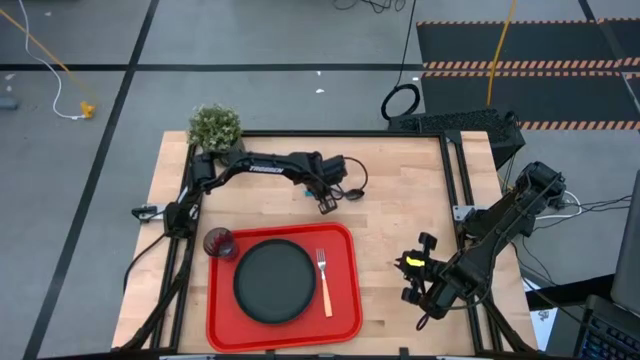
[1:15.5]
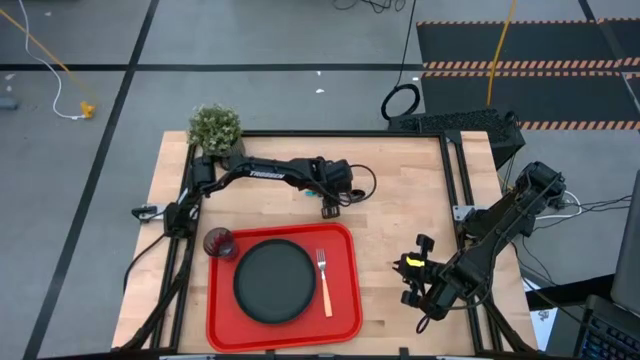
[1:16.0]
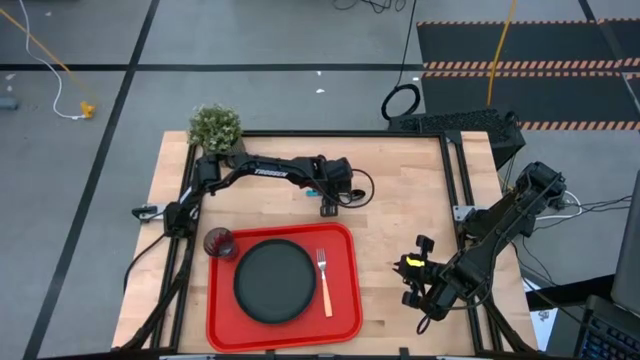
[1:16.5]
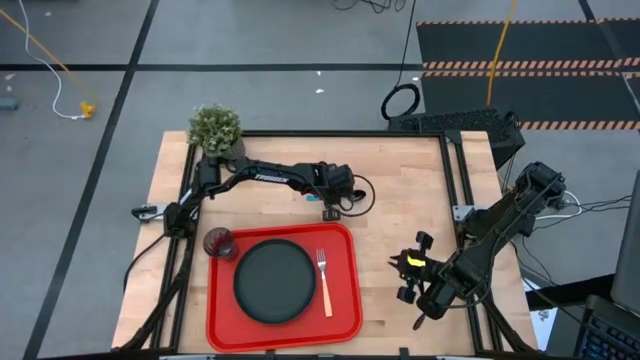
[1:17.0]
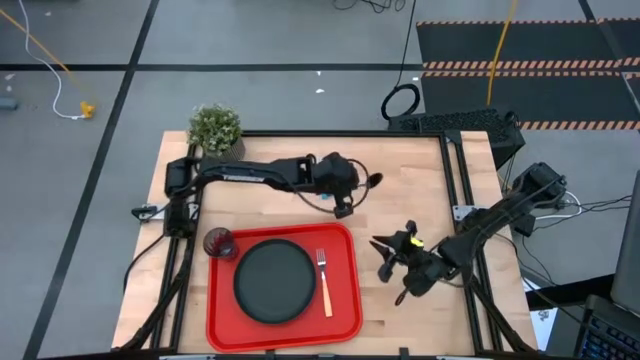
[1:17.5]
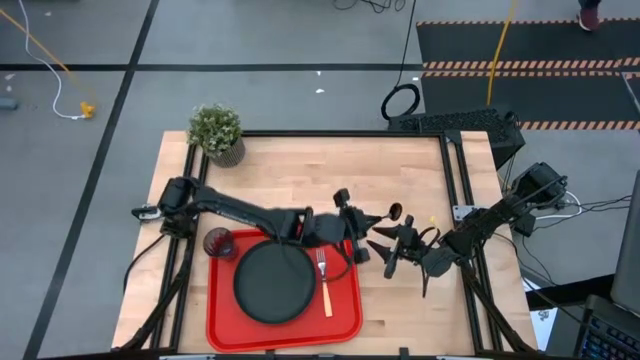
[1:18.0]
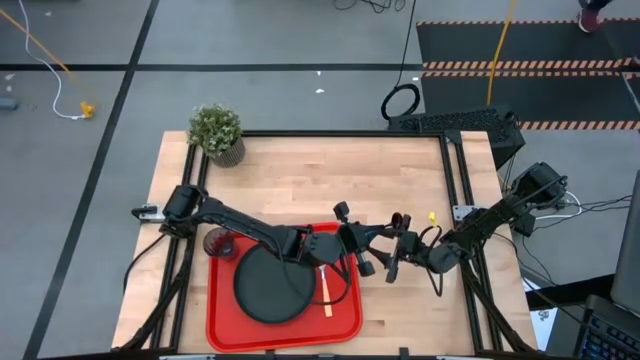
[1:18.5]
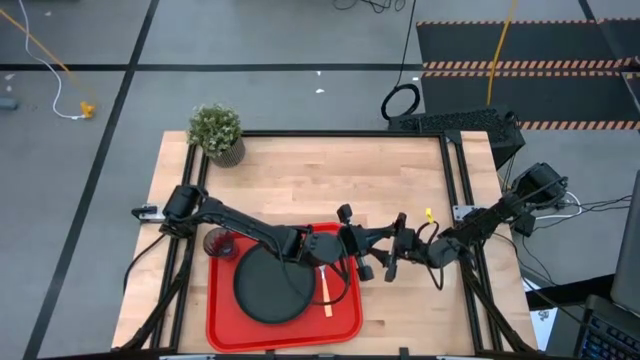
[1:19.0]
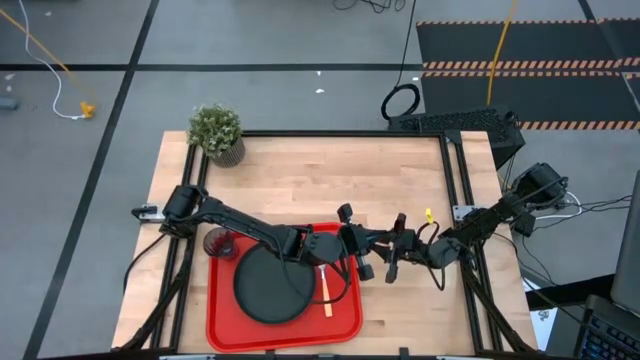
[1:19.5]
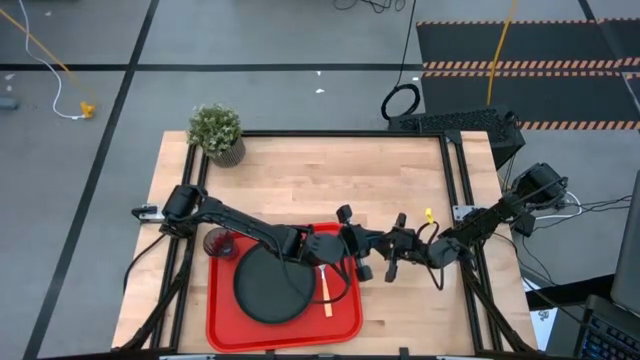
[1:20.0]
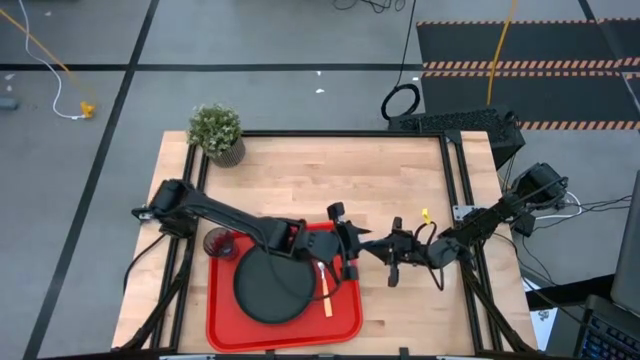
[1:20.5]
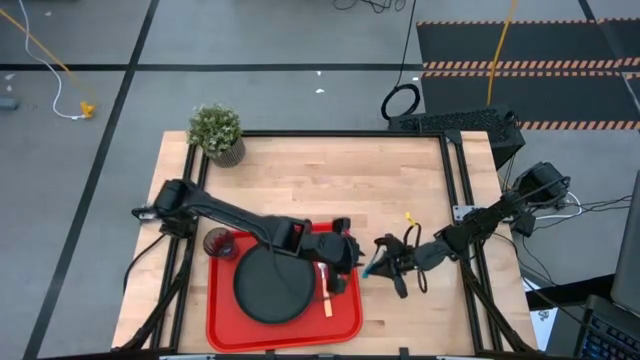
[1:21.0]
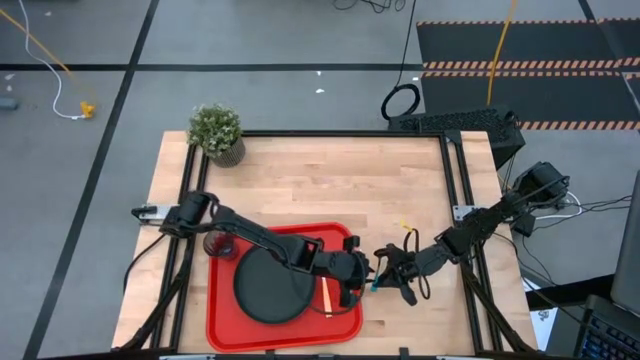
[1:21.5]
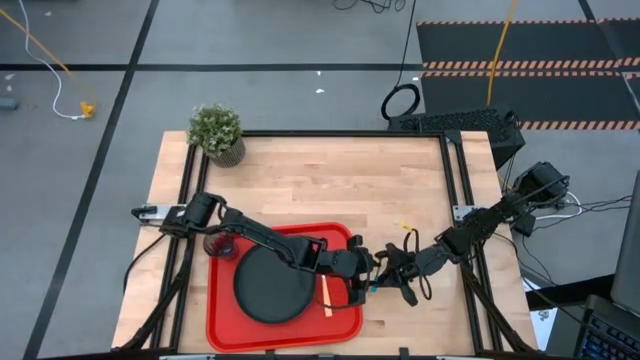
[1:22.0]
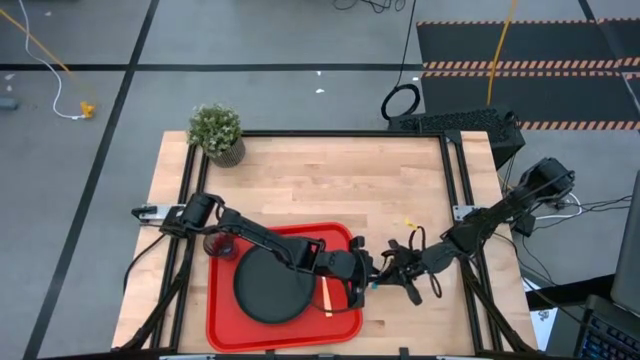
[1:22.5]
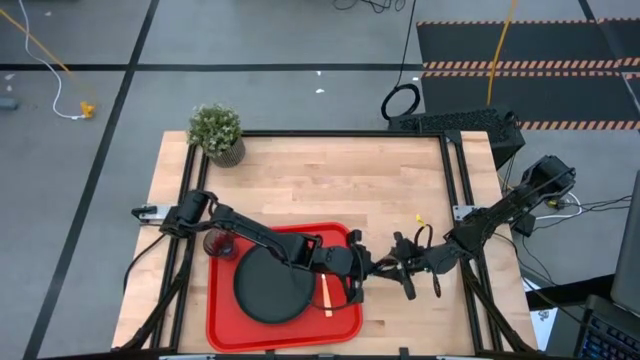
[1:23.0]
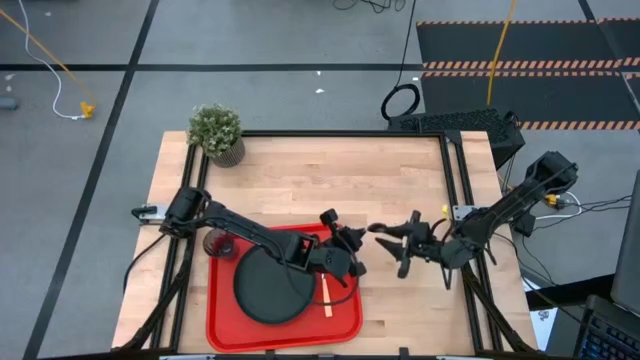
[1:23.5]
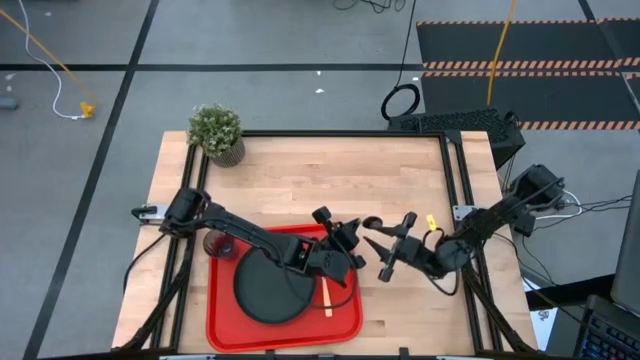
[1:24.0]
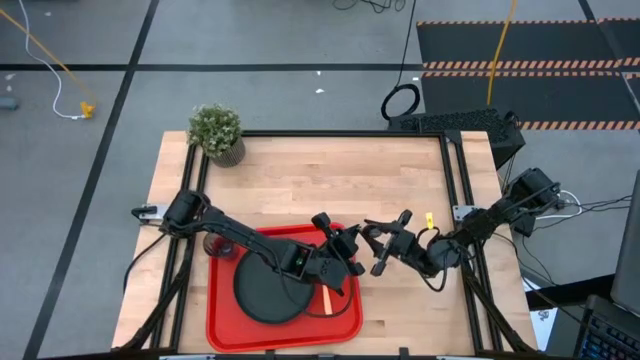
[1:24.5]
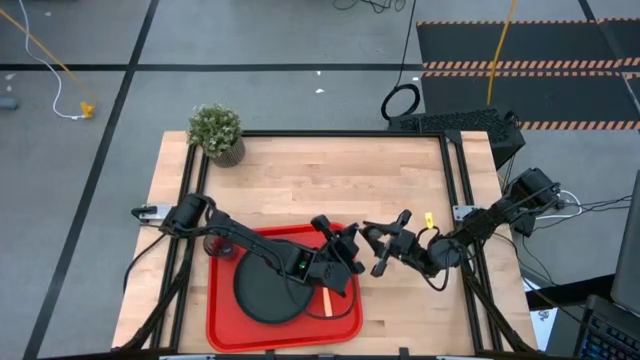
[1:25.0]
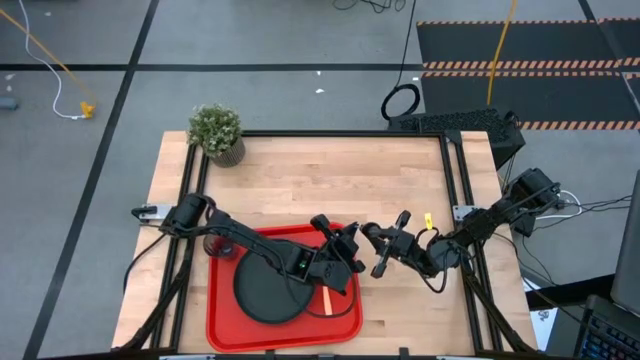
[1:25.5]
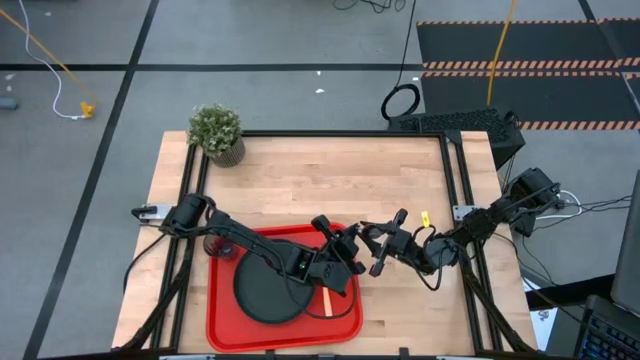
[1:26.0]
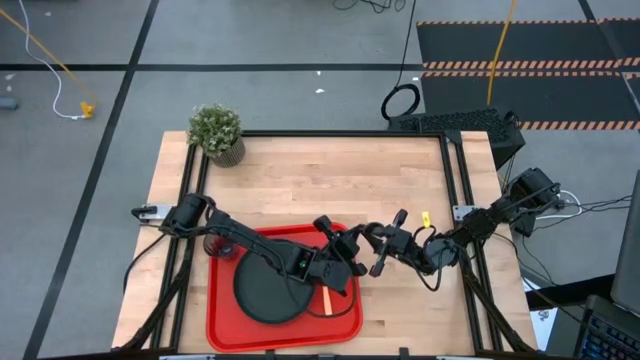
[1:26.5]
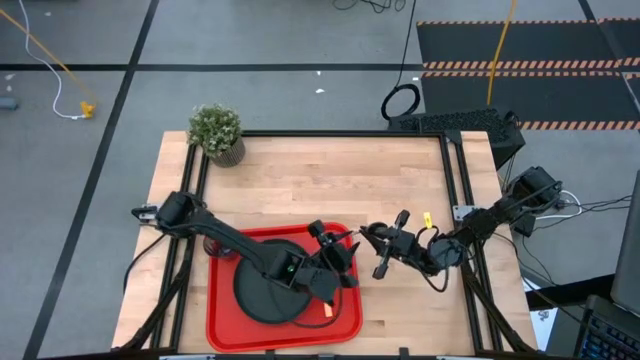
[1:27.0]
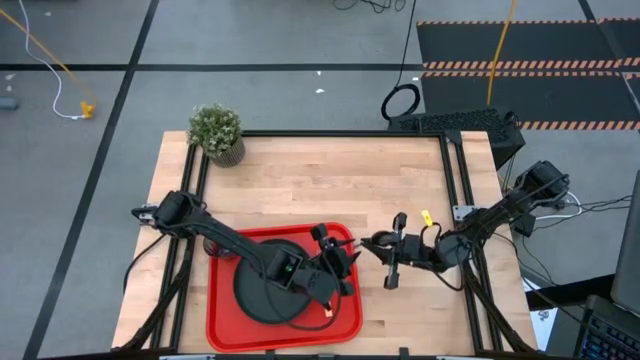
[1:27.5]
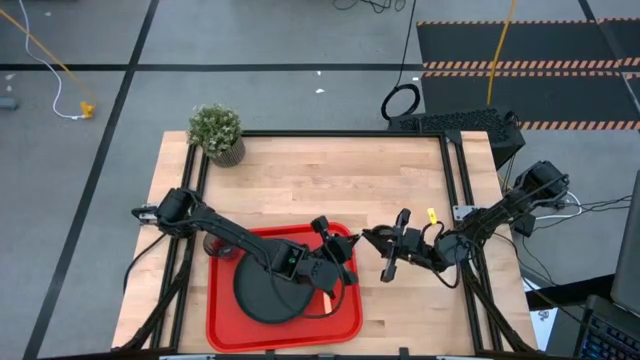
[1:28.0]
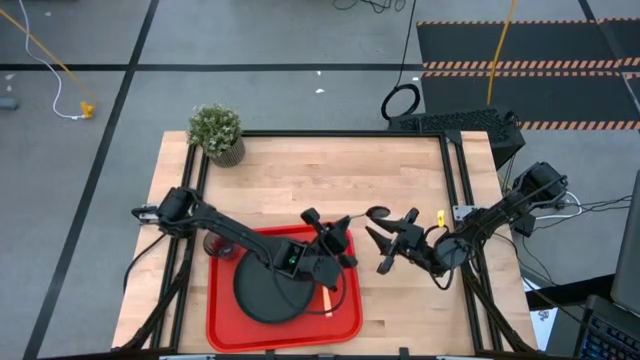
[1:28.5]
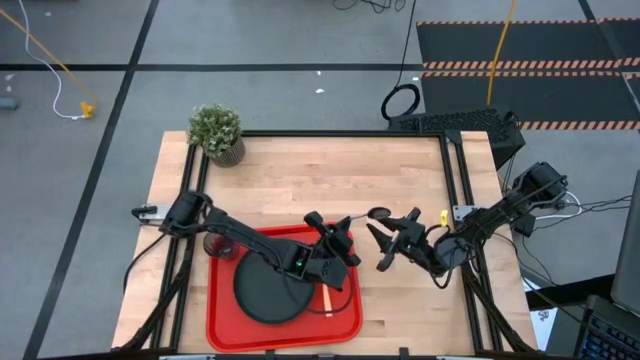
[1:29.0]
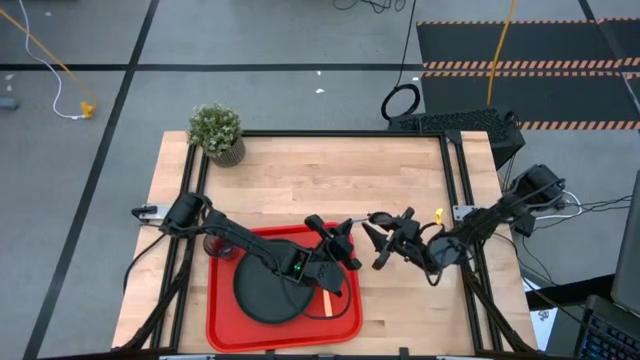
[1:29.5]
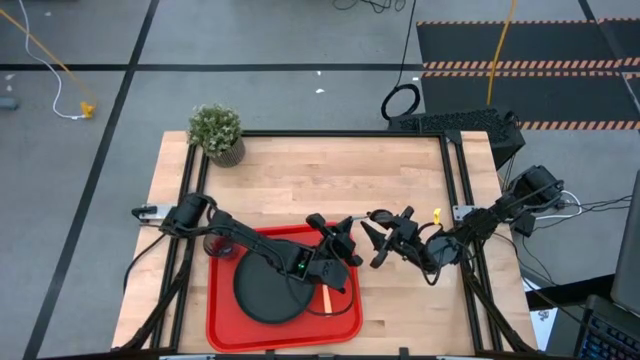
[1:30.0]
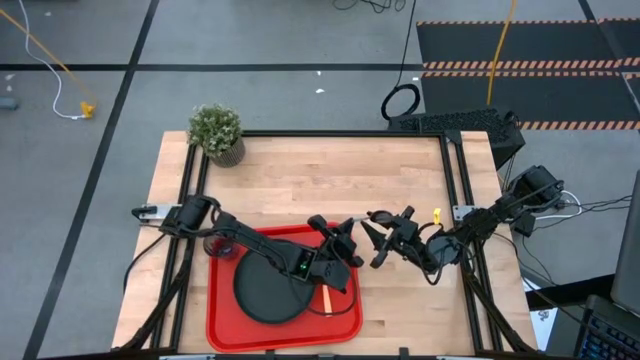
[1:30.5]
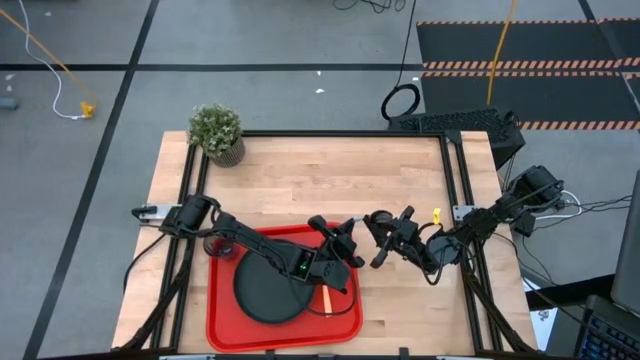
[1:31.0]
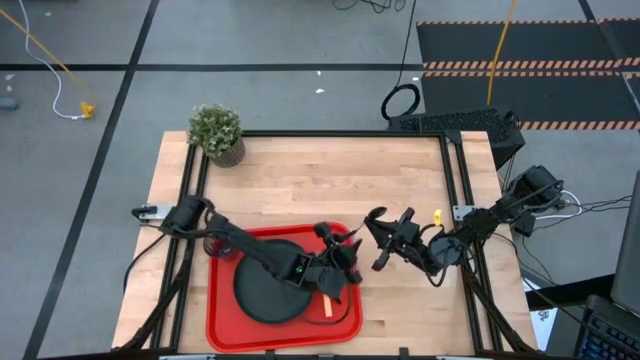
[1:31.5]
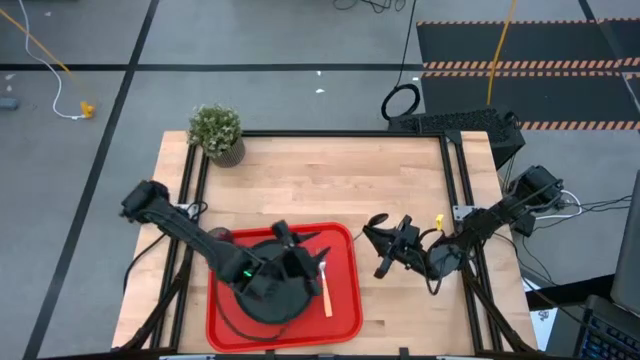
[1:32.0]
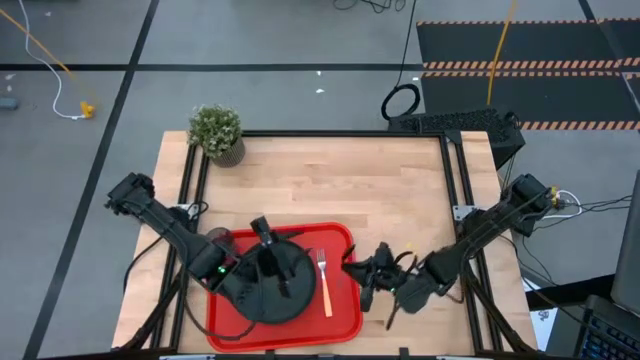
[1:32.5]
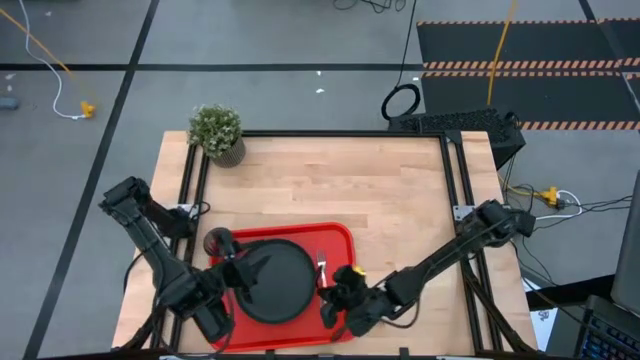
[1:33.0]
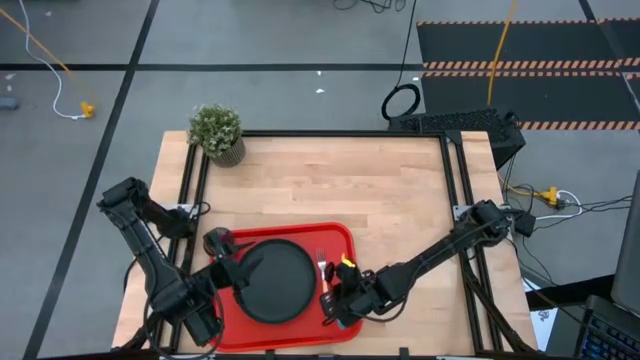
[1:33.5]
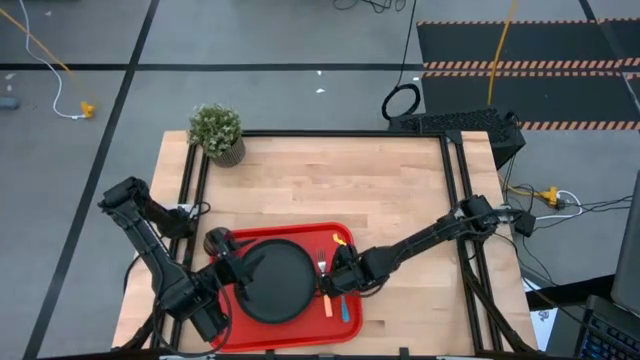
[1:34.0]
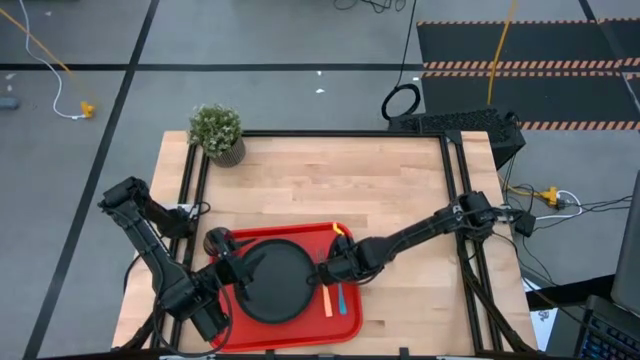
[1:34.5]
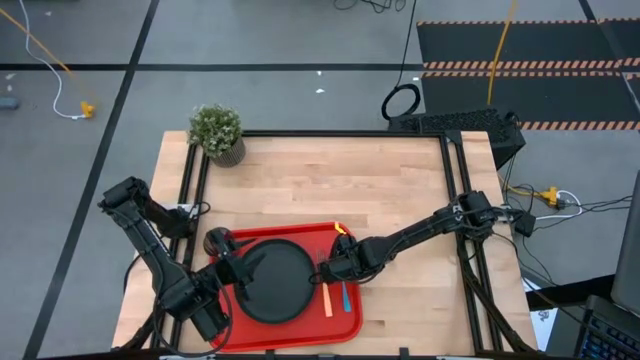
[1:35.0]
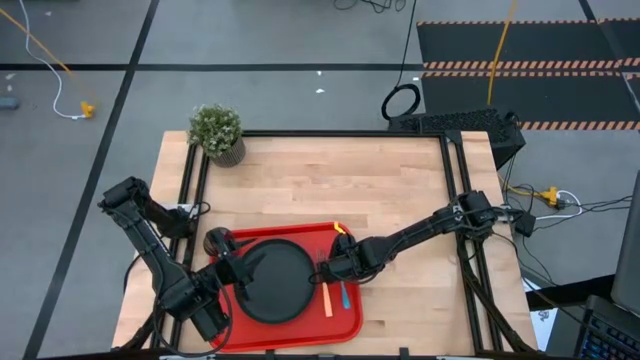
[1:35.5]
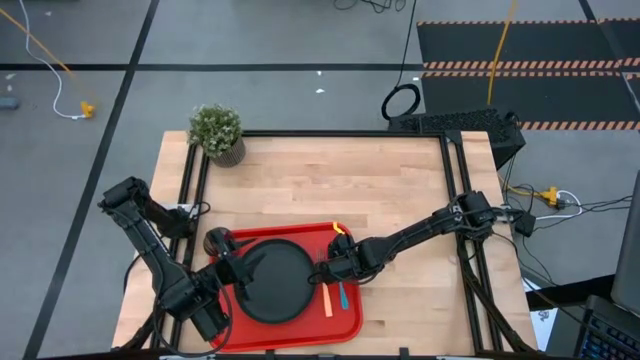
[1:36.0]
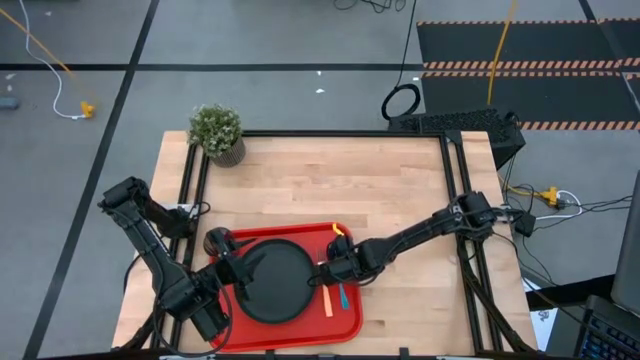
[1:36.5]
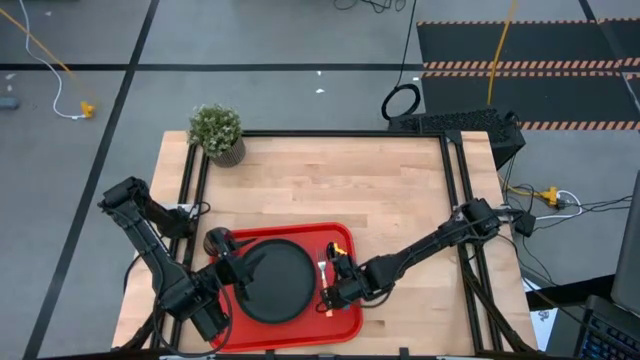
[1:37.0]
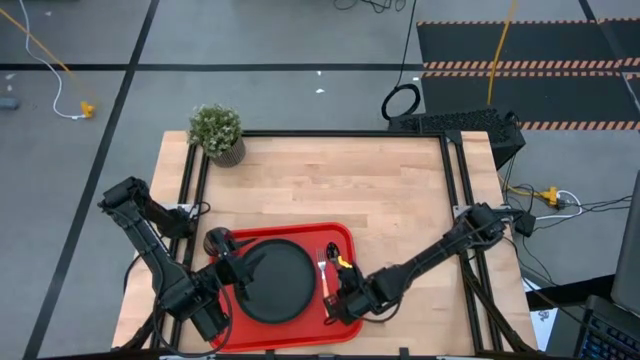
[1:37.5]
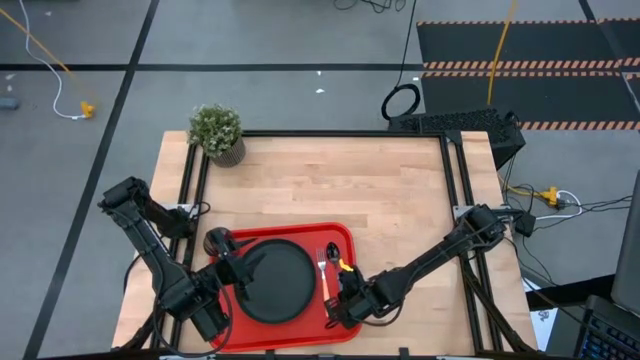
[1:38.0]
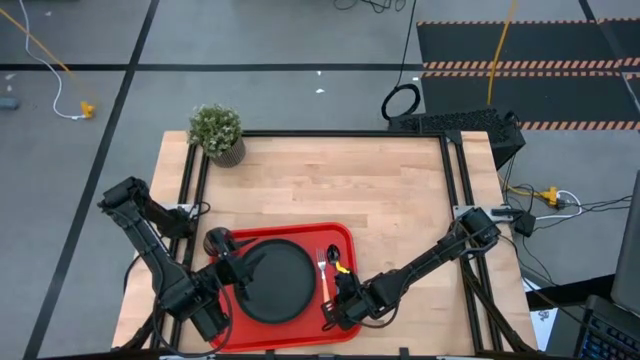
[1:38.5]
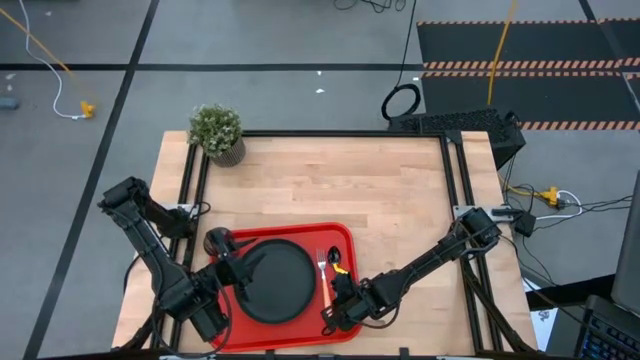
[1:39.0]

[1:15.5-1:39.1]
Task: Pick and place plate/cup/fork/spoon on tray
Put the blue spoon on the red serving tray on the right side of the orange fork
